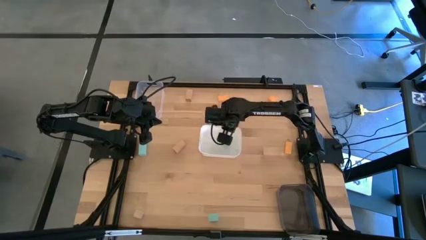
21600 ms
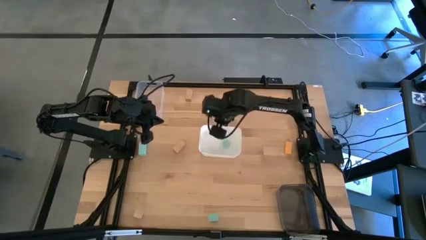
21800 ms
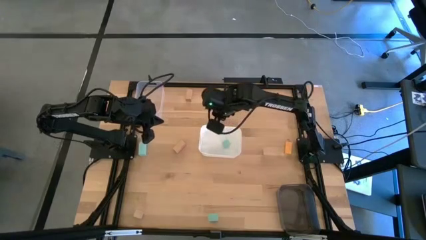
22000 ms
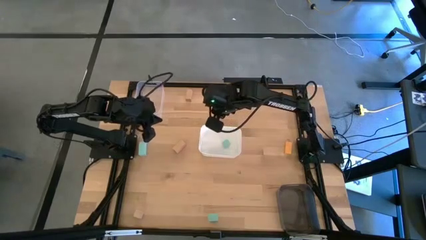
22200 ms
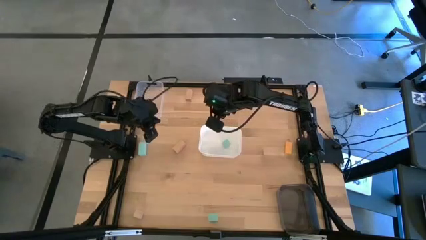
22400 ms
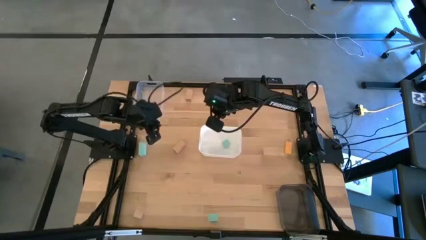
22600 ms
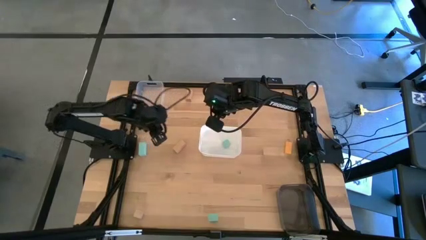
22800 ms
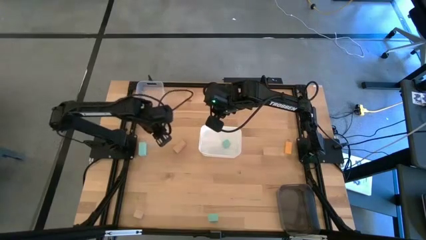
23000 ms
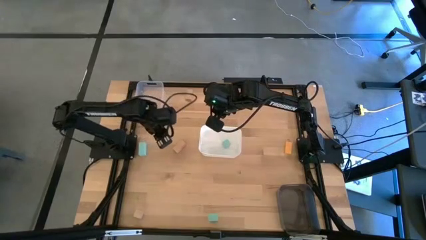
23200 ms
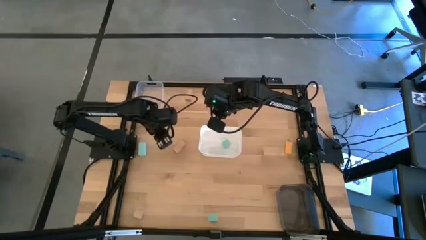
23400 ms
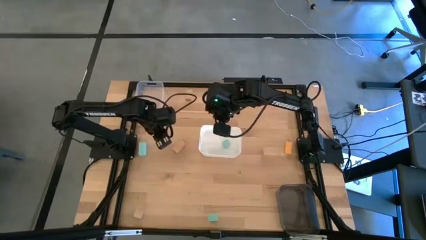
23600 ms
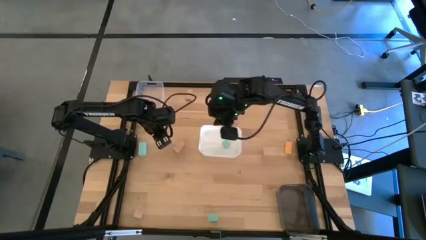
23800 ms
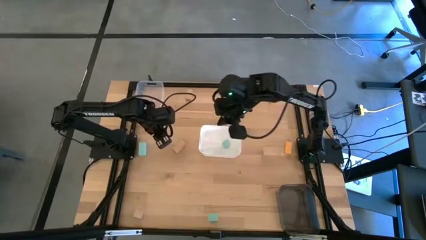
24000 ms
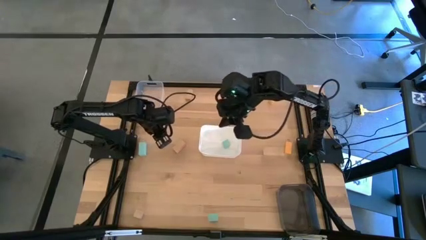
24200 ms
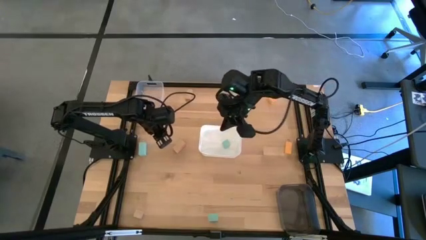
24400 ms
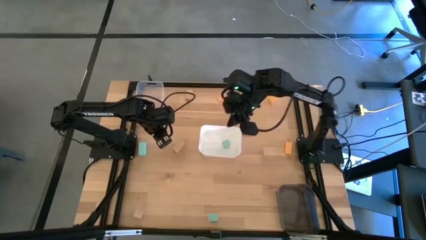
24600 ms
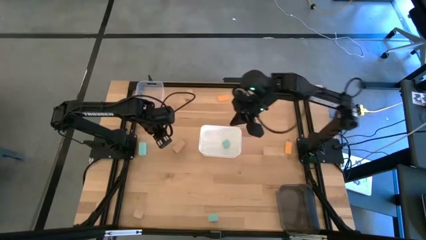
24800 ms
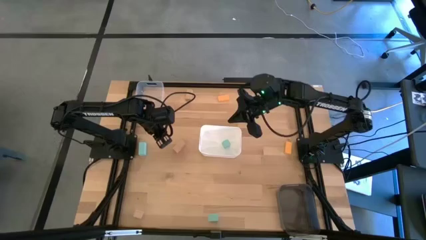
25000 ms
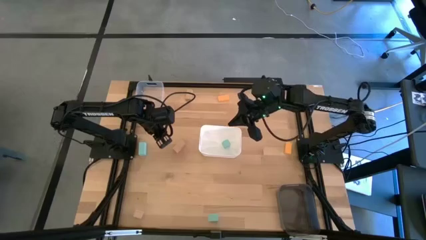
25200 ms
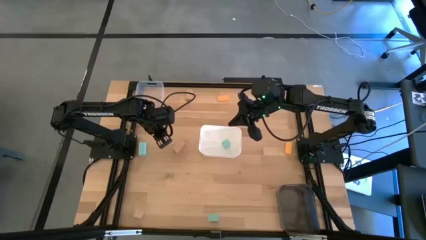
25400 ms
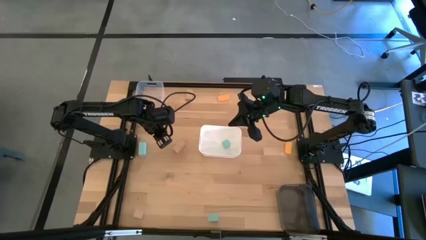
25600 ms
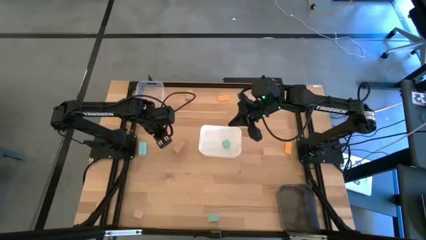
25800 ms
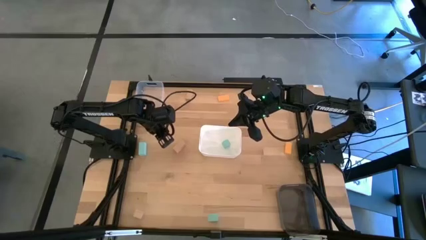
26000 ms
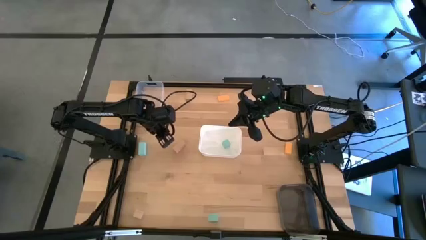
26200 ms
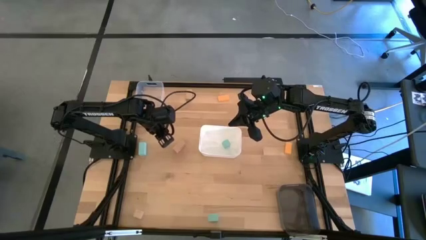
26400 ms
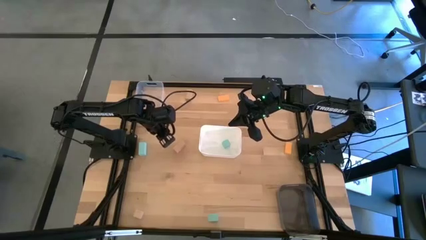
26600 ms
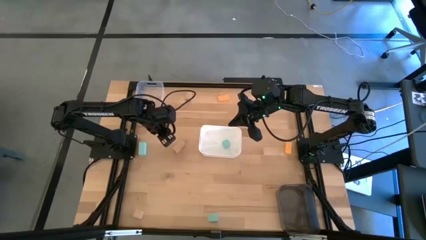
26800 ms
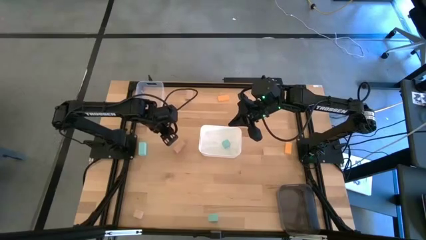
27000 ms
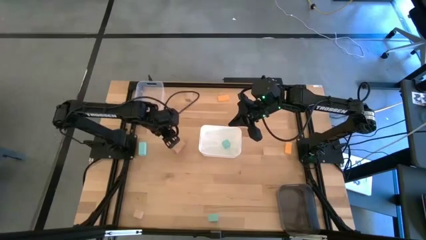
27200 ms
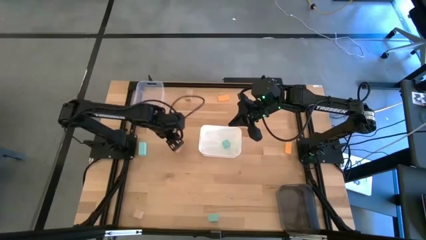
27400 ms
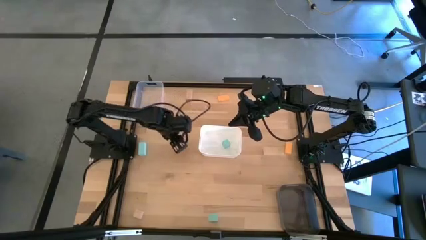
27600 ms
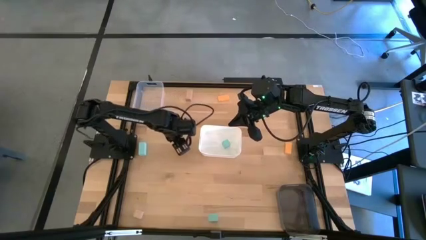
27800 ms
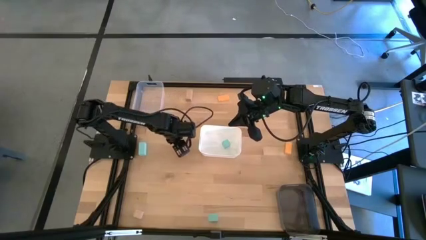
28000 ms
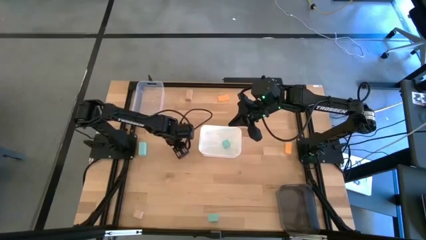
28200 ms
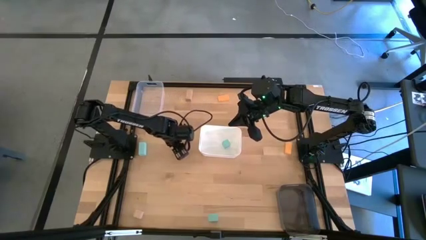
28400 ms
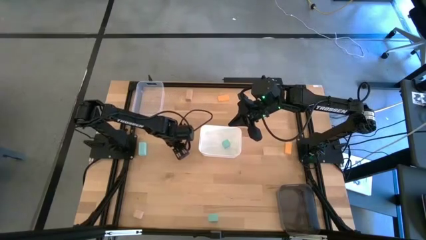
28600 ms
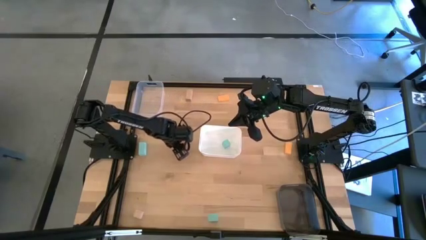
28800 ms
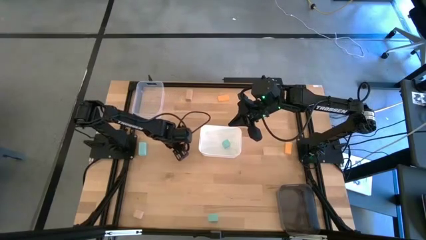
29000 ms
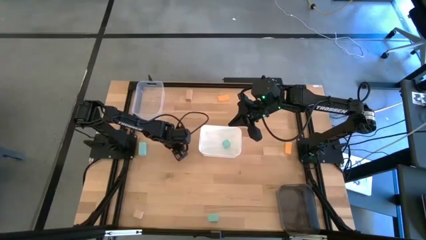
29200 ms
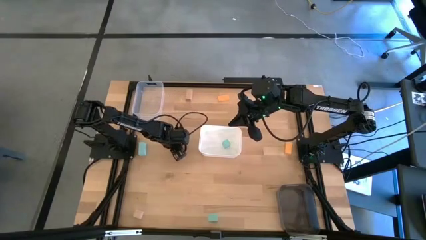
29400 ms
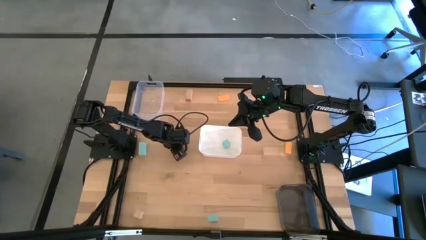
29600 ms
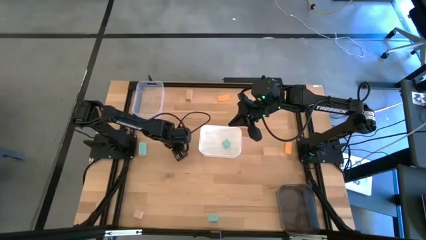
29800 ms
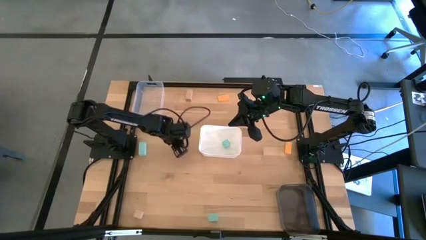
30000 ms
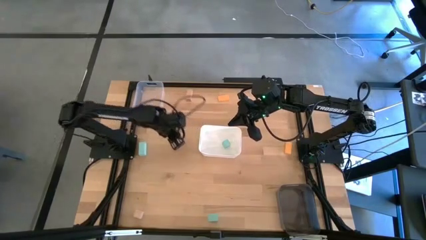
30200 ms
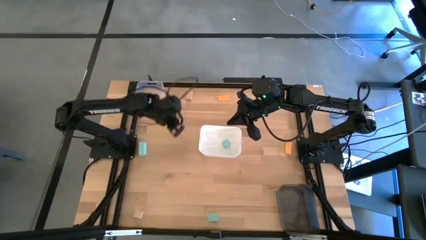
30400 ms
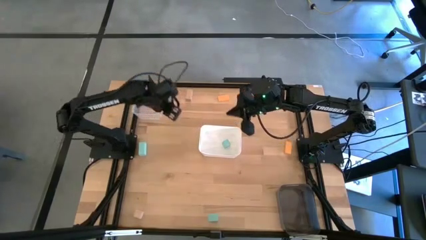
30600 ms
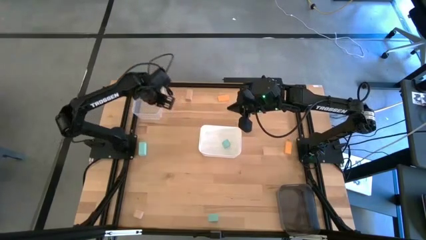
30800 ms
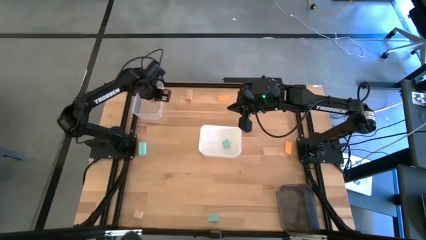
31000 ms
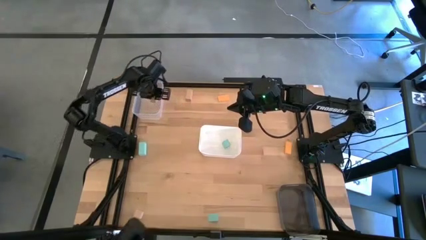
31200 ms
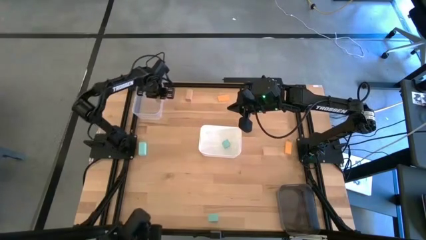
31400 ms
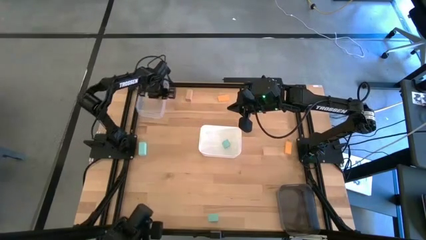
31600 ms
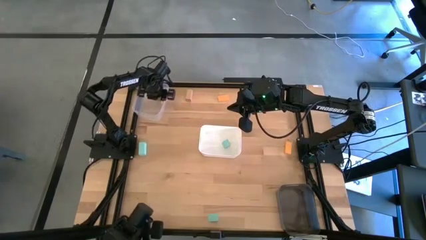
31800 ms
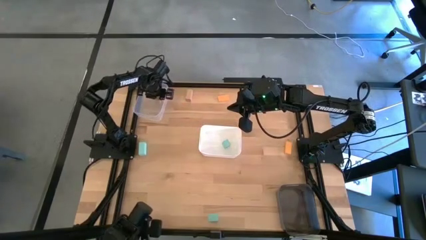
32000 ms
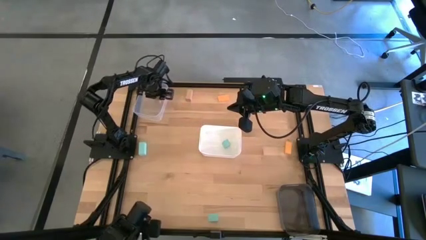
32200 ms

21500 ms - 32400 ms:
Task: Sort & place blocks by color
Put the middle light brown block into the transparent bin

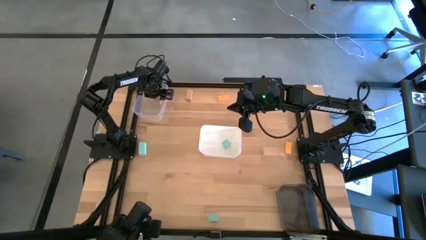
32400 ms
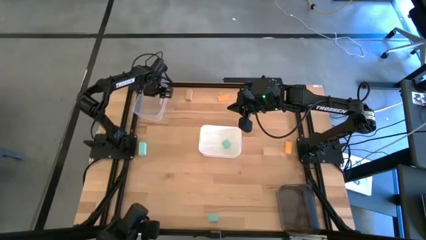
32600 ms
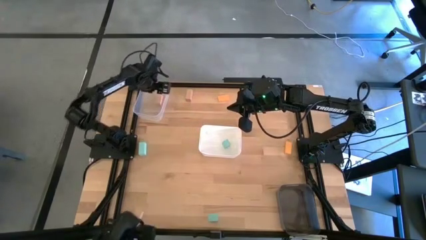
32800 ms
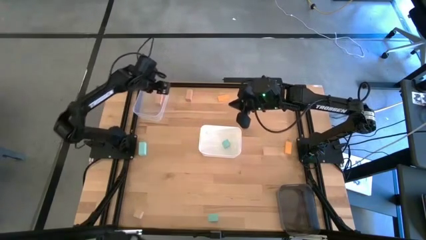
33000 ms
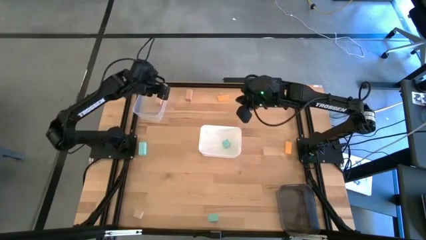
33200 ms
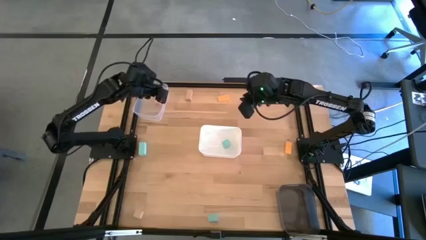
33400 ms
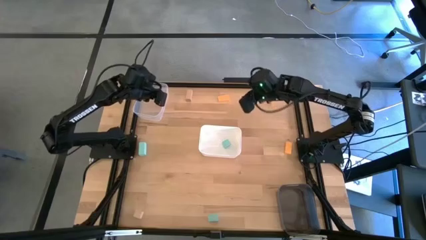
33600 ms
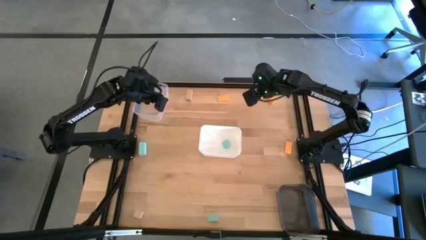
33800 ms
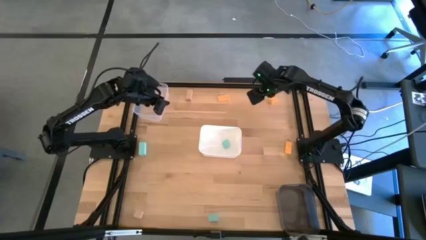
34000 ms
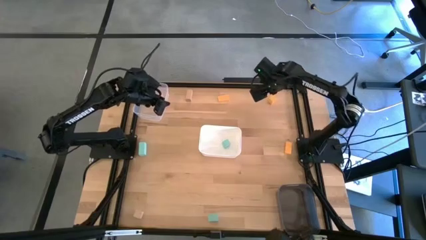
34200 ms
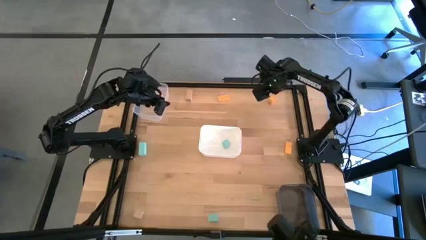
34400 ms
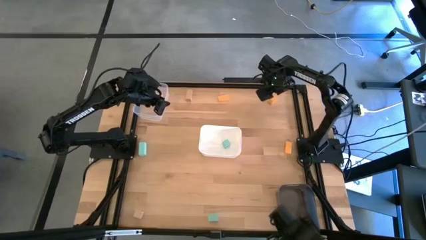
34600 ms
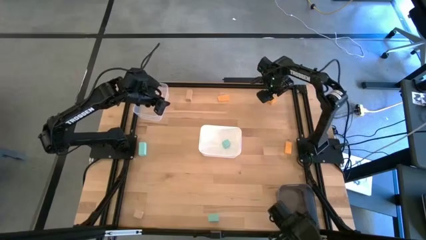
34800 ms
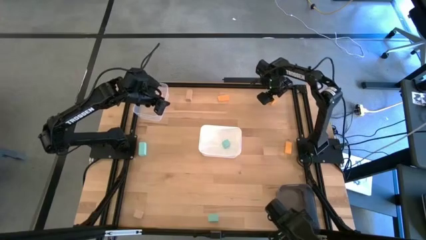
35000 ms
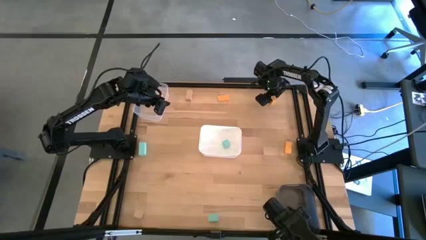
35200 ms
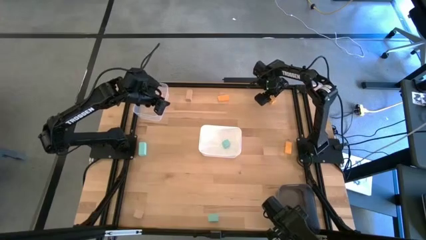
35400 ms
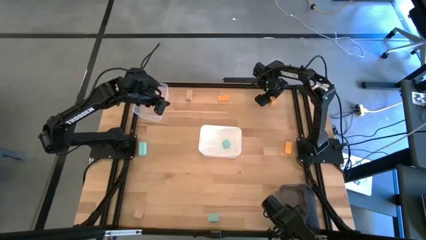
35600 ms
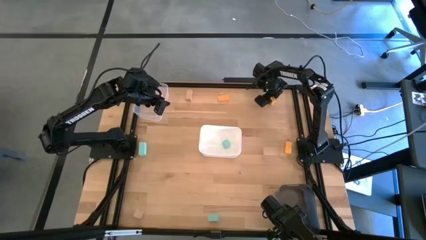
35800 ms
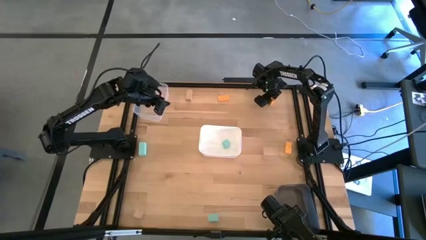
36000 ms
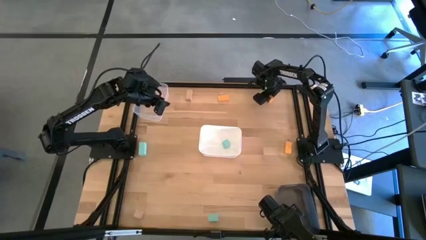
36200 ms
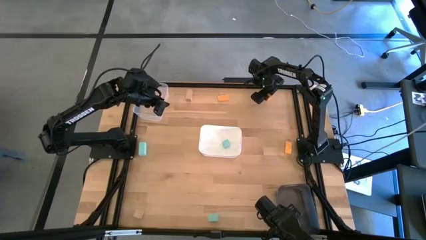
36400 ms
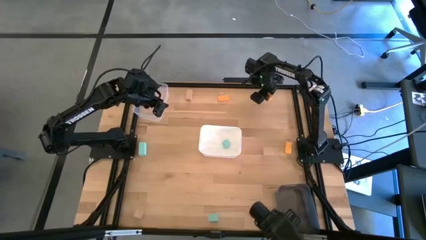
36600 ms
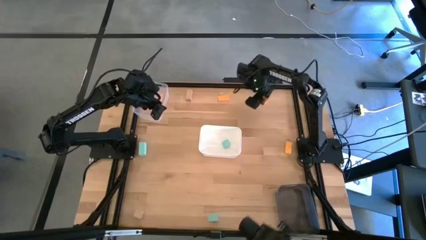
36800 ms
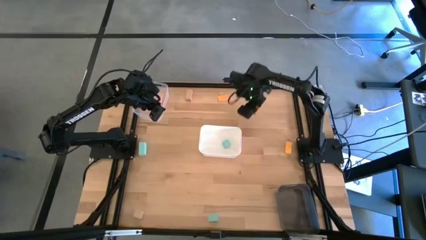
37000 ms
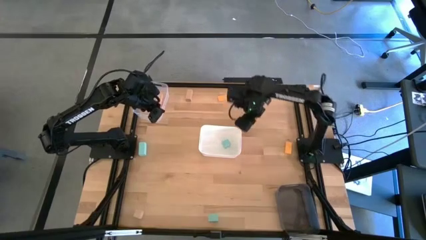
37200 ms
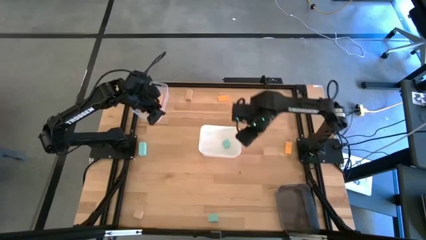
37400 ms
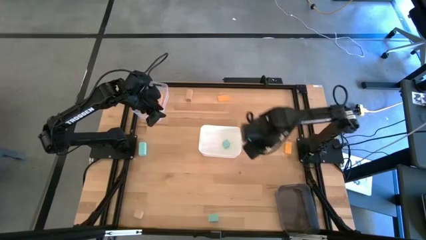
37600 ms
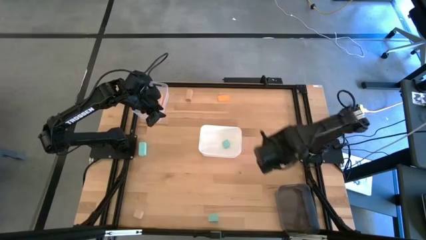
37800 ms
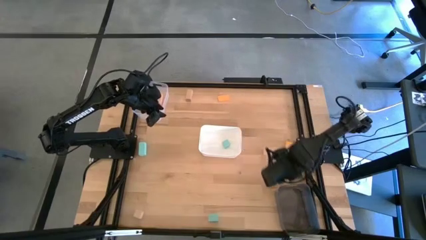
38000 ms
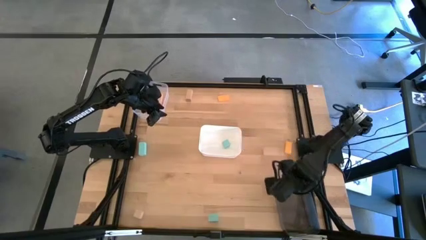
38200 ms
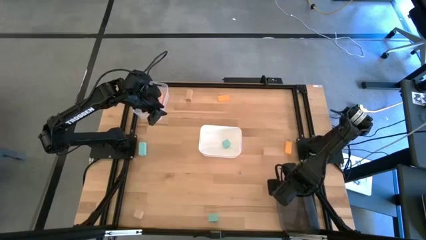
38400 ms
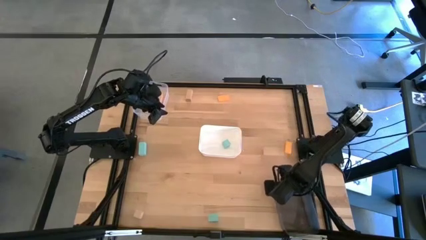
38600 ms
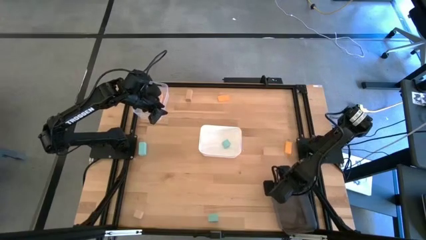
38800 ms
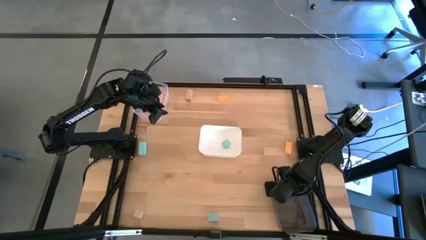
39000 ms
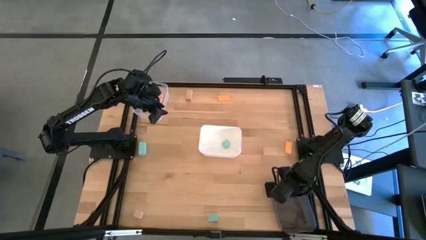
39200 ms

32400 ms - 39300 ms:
Put the top right yellow block into the black bin
